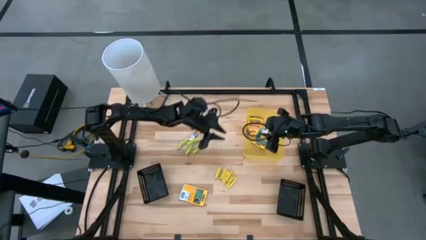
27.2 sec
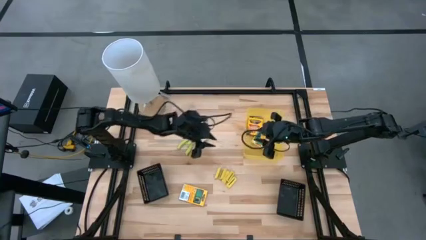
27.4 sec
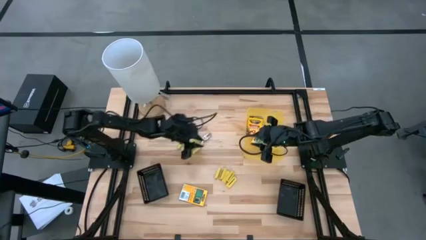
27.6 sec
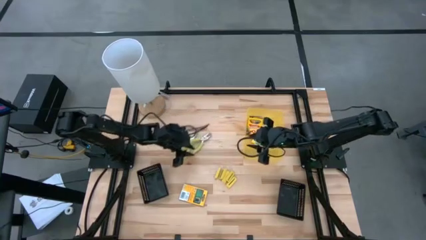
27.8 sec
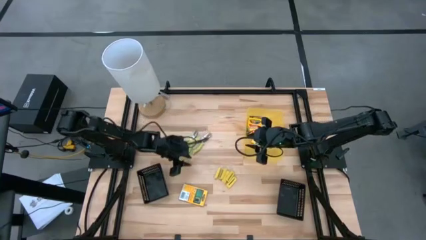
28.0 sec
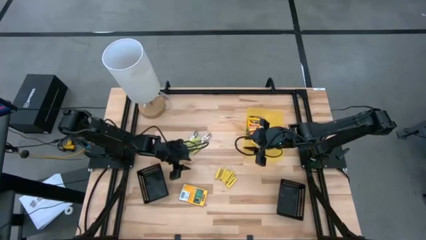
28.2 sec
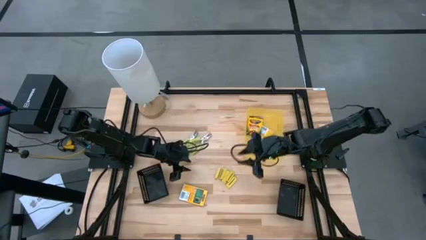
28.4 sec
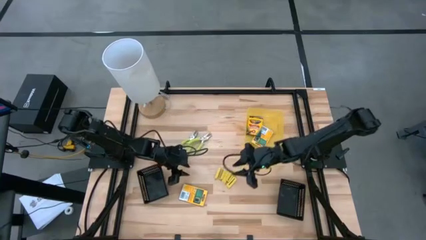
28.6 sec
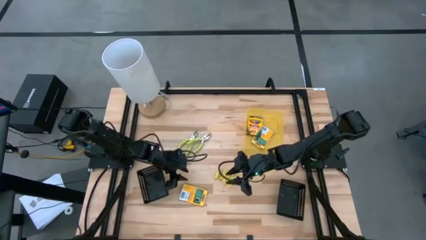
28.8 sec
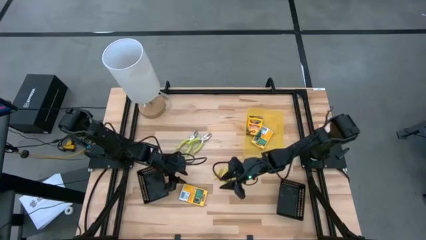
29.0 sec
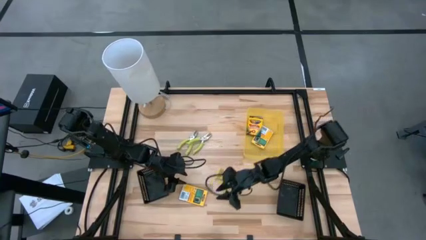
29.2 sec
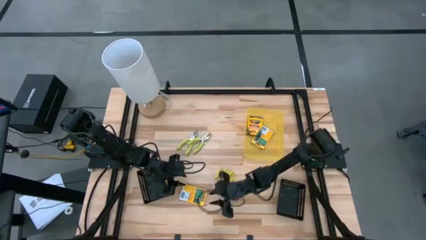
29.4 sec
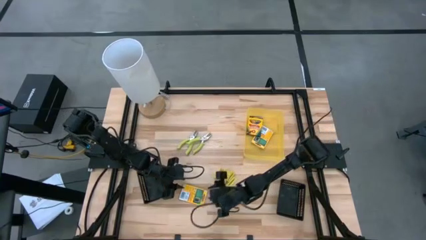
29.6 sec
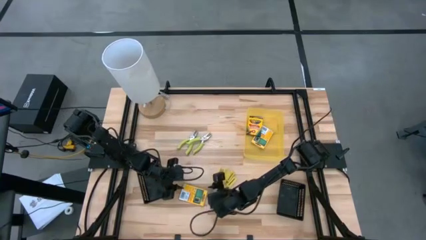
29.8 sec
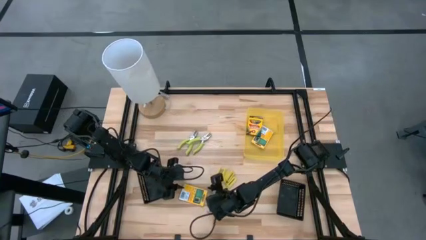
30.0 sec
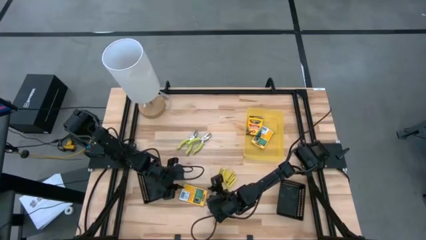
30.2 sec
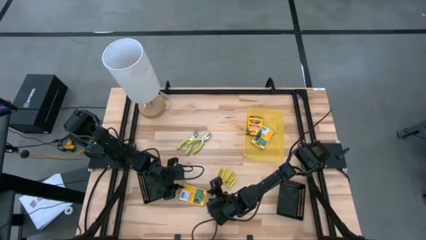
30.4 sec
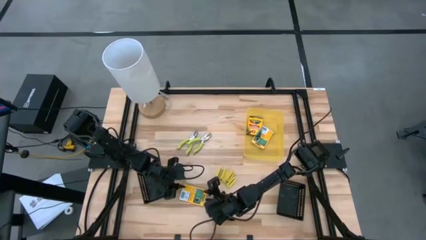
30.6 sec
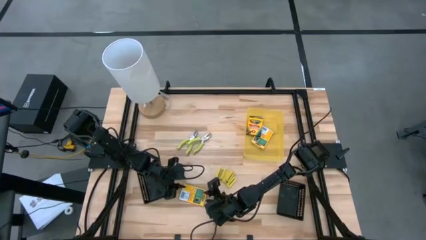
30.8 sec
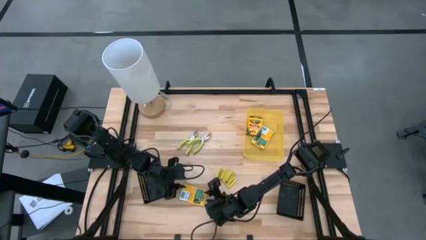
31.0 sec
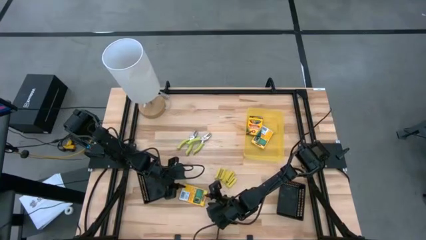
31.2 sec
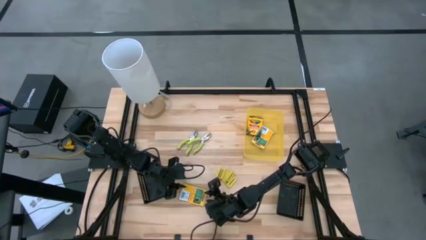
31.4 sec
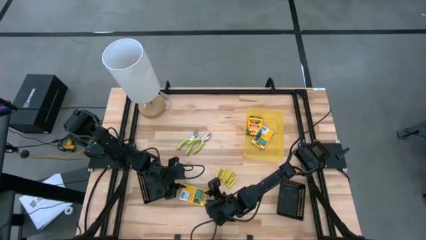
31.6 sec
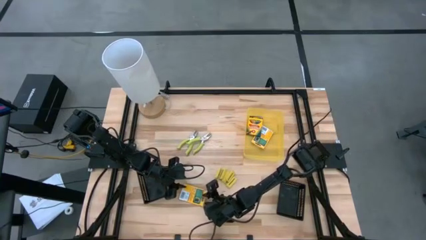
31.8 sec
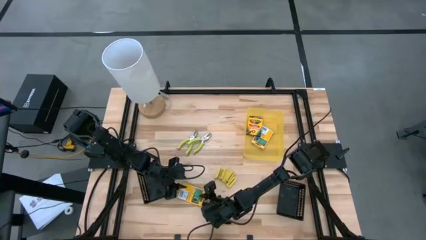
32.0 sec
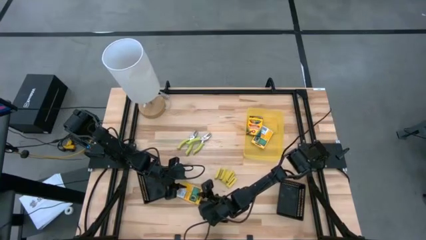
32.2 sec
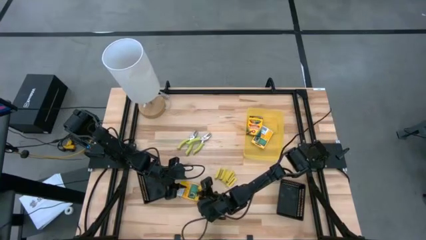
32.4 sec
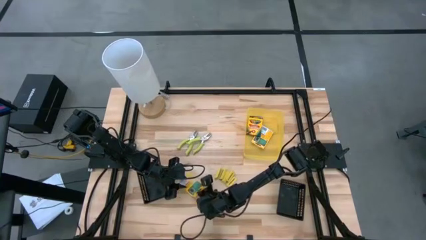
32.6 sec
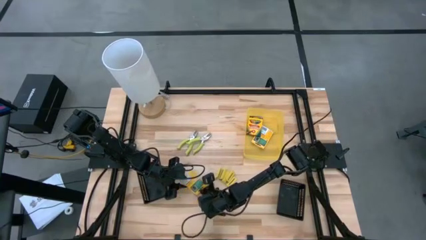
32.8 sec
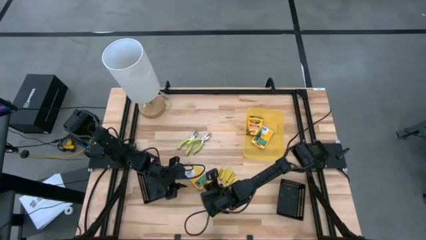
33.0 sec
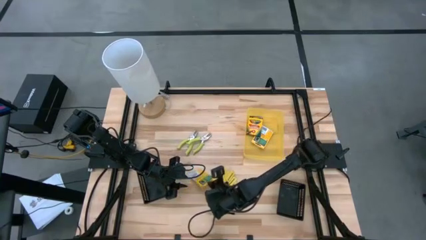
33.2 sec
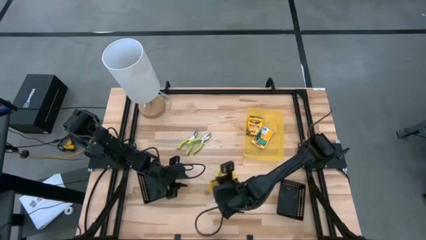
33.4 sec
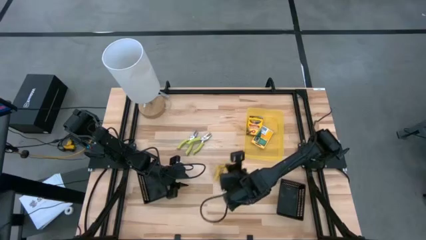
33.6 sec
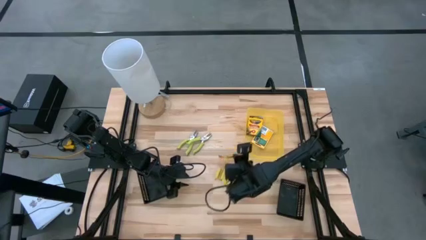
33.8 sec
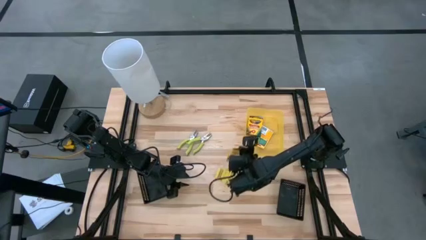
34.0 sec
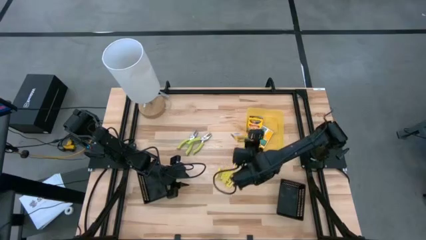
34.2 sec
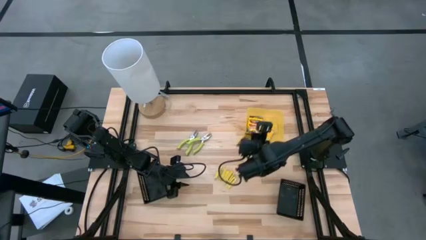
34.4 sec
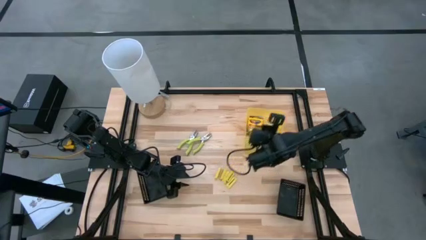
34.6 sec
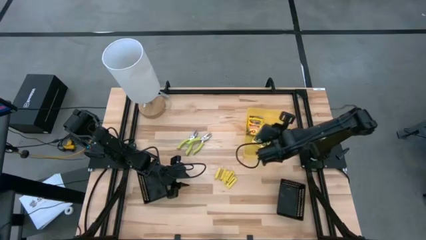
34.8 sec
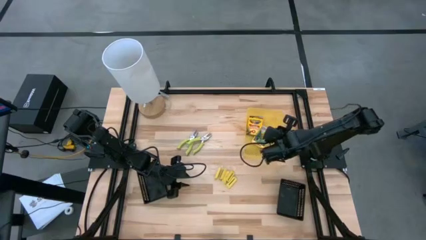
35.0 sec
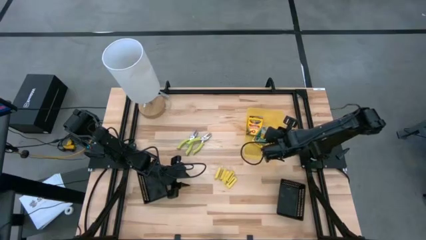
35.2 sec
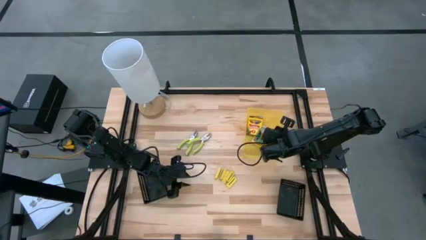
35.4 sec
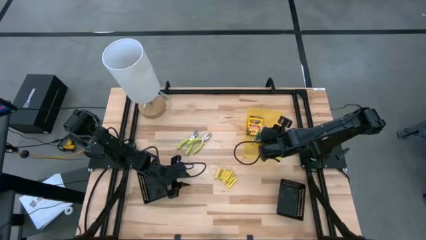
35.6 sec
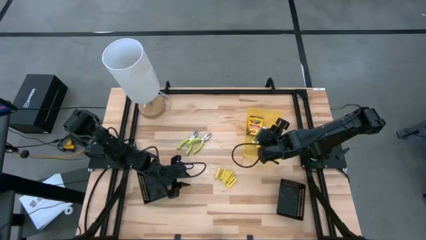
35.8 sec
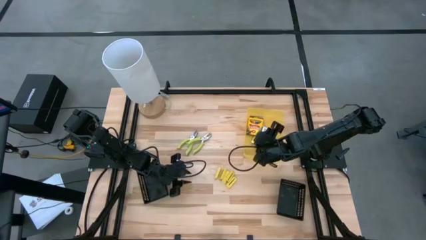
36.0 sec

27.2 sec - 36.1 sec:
Task: Pick & Place School Supplies
Put the crayon box into the yellow bin

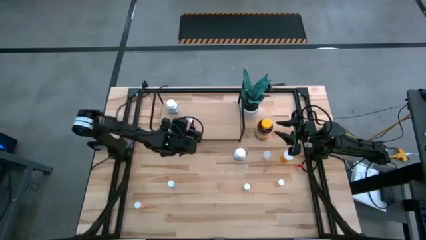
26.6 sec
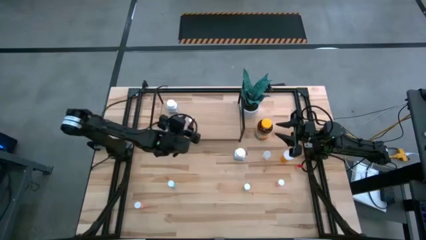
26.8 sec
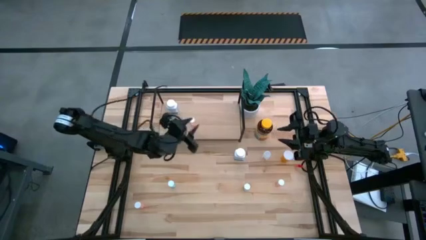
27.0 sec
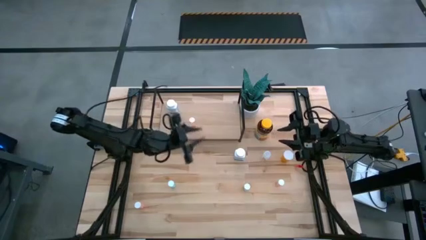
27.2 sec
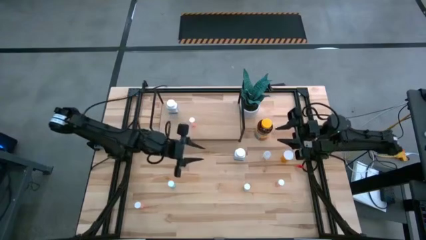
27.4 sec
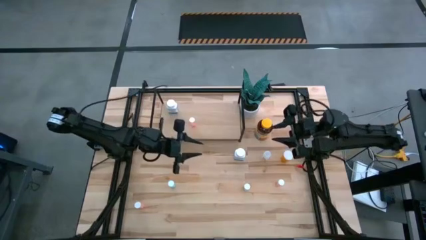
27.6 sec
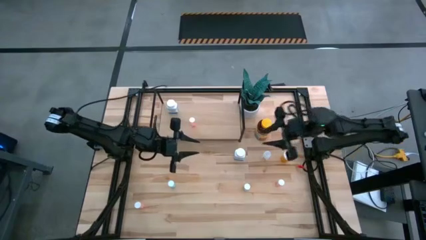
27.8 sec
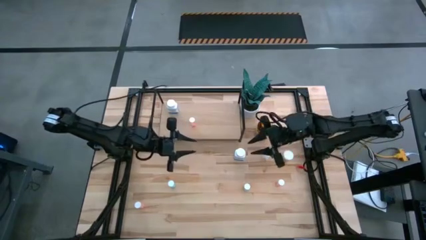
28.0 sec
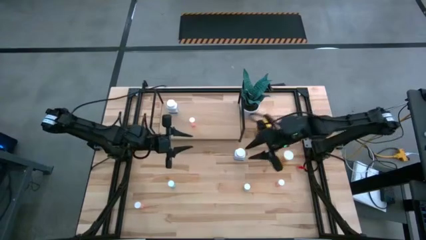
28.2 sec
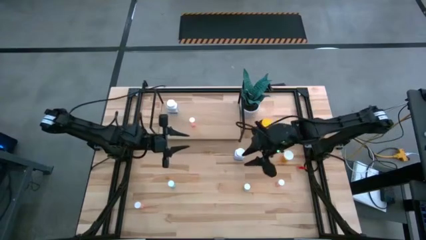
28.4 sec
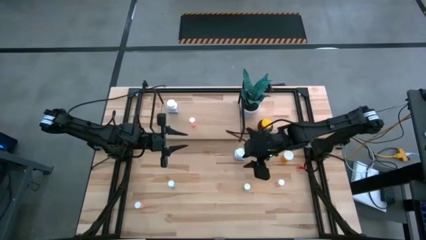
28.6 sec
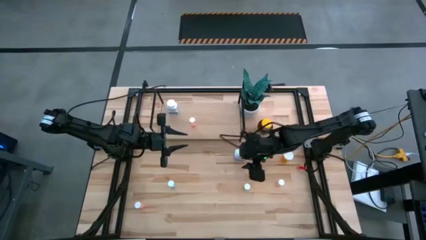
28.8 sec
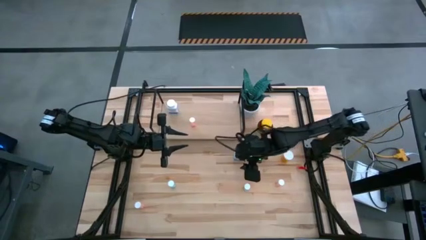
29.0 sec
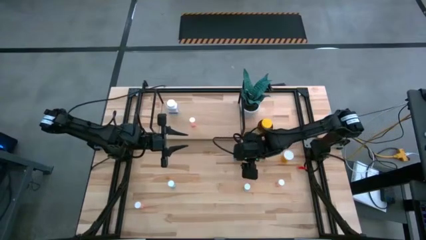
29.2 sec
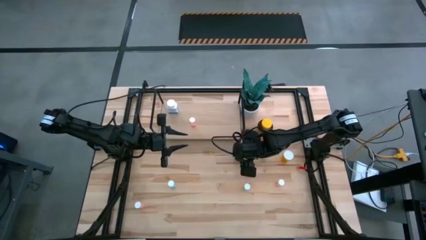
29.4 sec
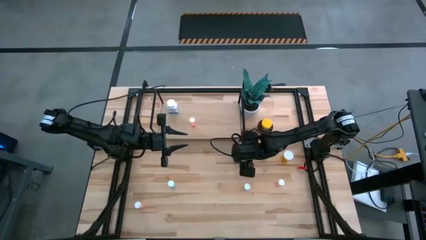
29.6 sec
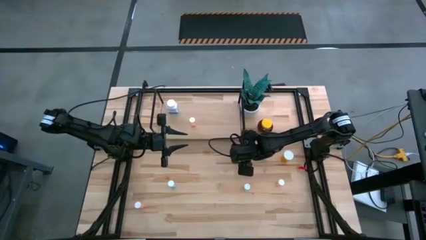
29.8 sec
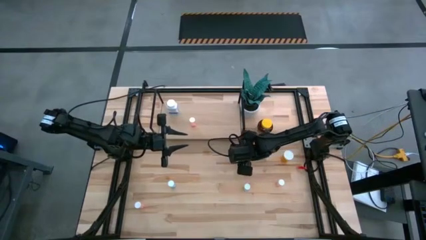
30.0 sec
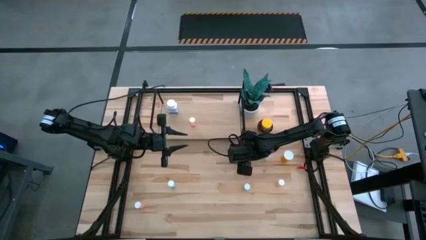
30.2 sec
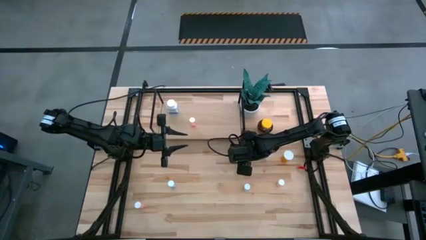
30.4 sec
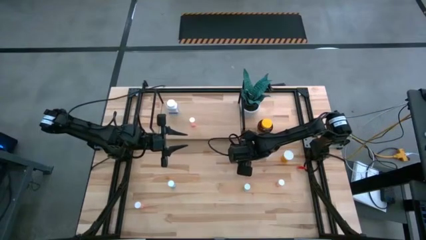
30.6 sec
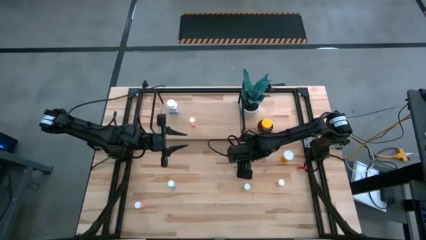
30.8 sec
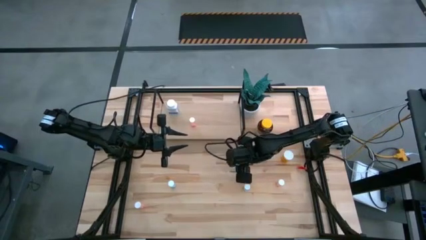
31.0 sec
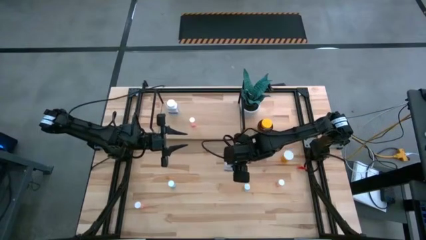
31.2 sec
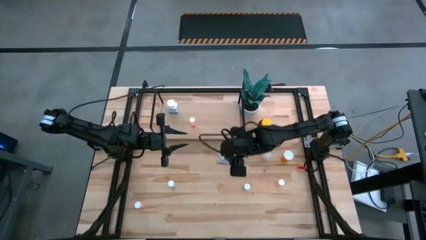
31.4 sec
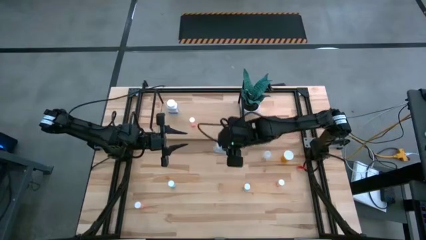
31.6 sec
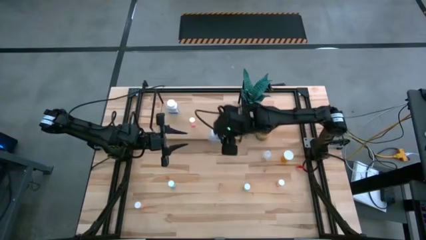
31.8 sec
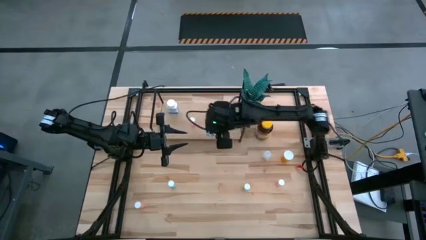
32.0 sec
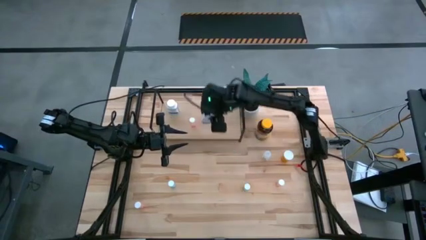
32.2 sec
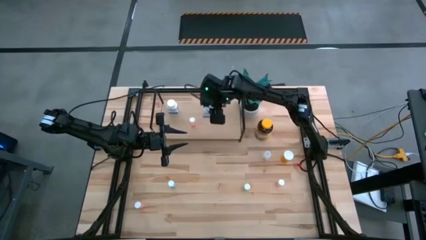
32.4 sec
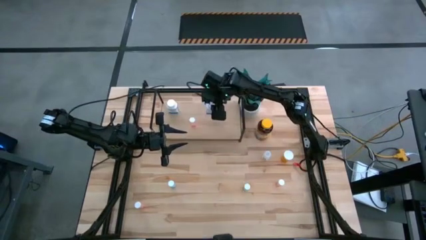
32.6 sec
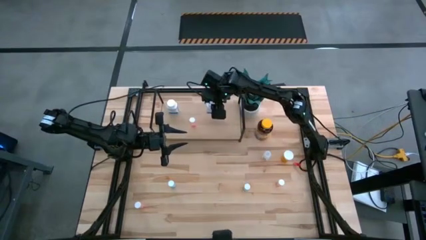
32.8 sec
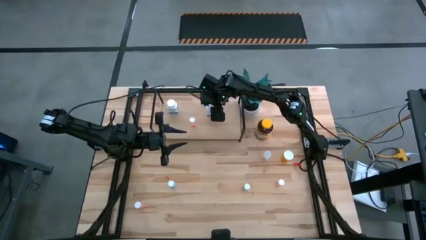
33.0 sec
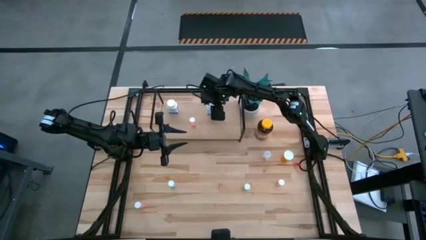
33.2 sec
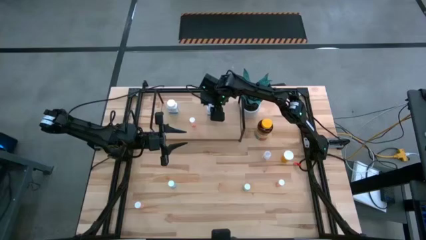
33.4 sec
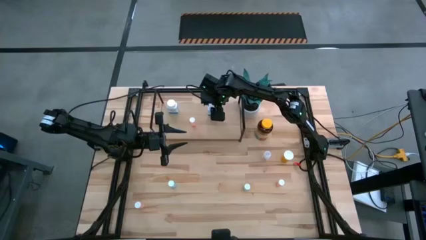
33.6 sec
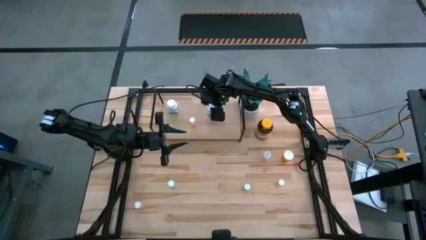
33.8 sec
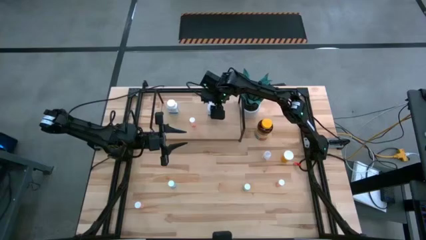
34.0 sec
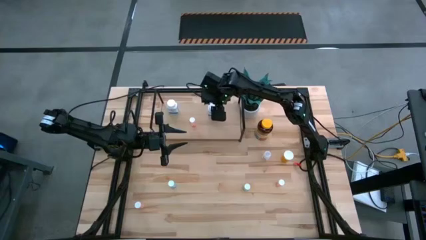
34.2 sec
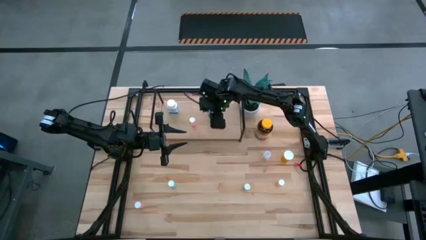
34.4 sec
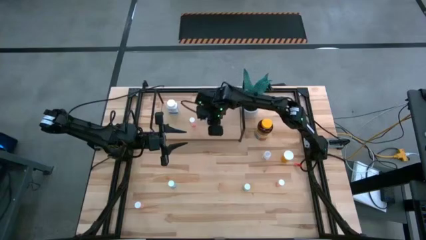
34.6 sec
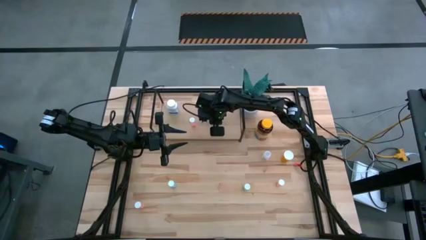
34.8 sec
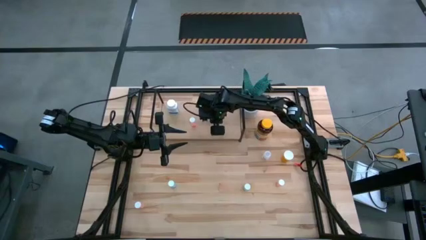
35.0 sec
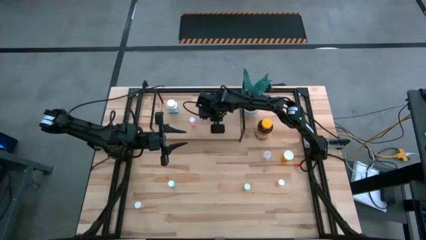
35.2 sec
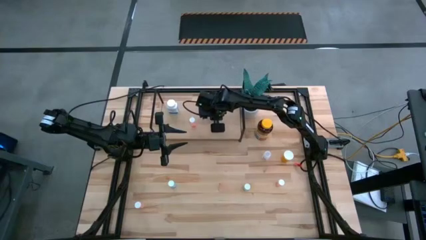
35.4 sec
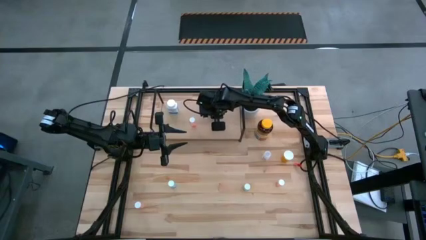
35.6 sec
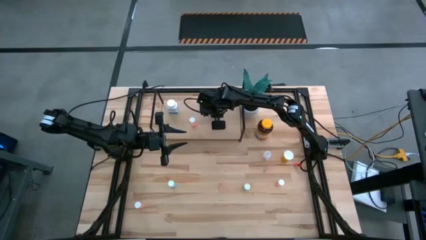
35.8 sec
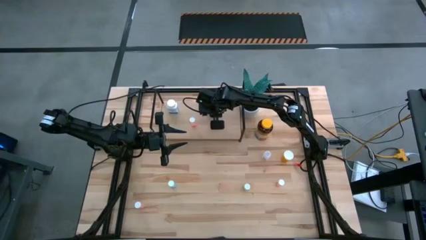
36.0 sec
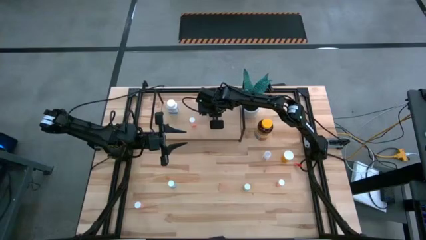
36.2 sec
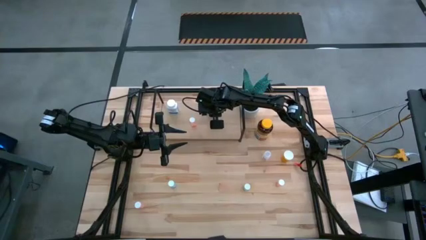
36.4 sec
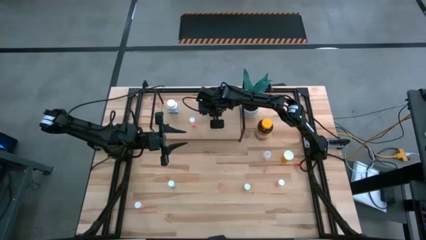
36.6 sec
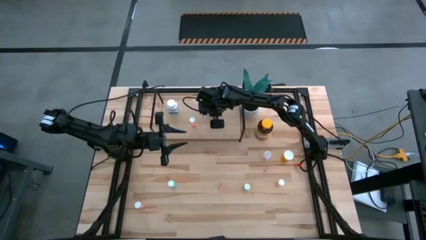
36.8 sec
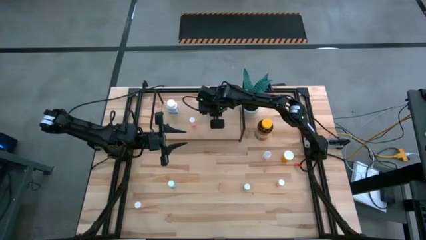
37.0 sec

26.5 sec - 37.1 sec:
Task: Pick and place medicine bottles onto shelf by color
Put the white medicine bottle on the shelf
